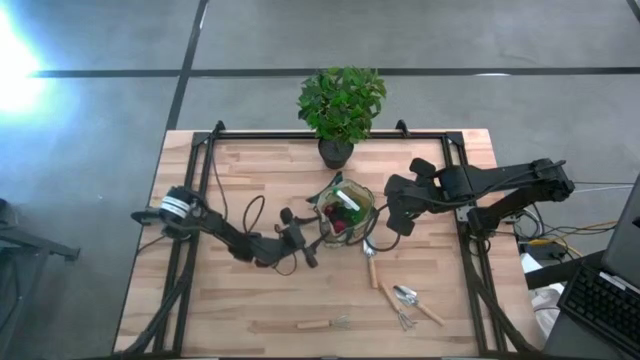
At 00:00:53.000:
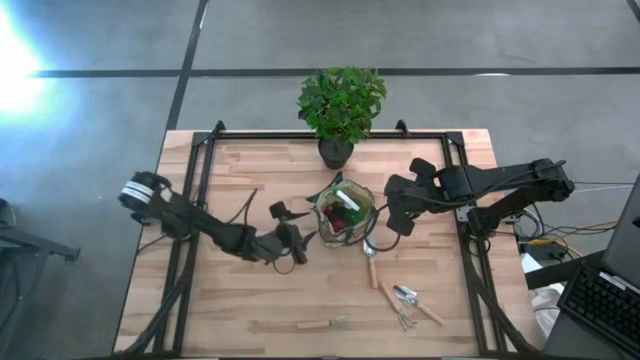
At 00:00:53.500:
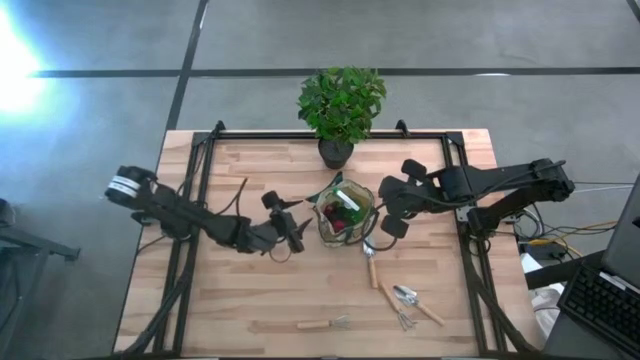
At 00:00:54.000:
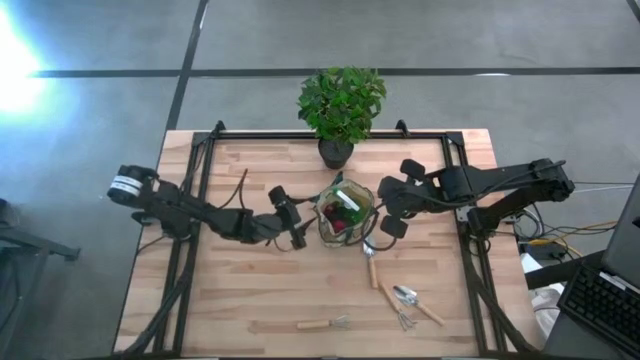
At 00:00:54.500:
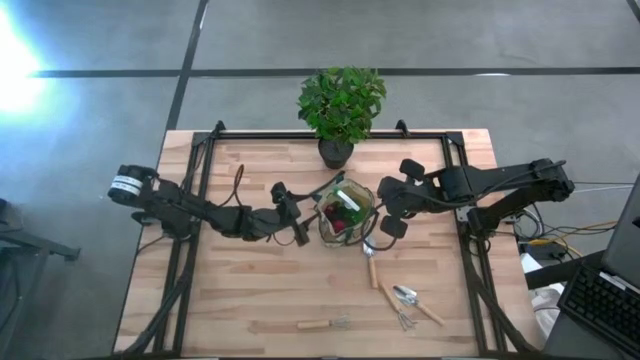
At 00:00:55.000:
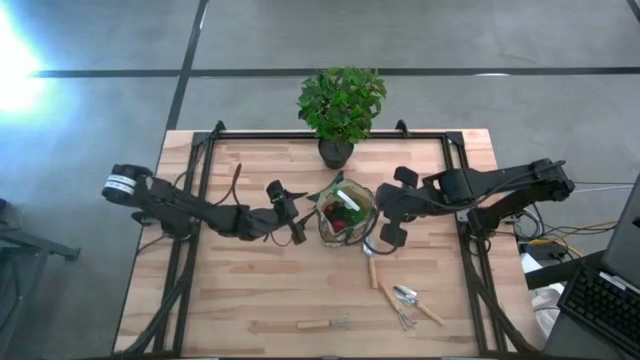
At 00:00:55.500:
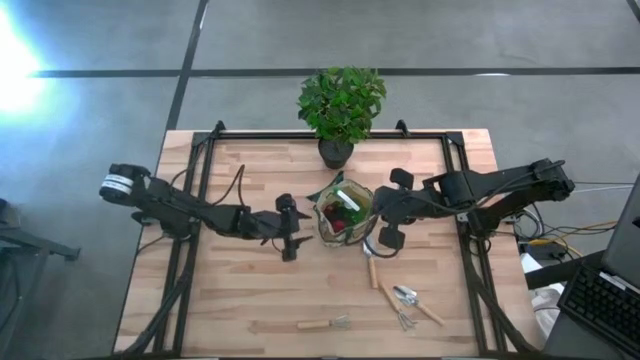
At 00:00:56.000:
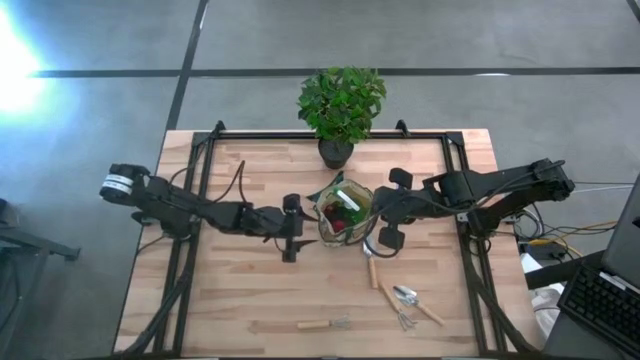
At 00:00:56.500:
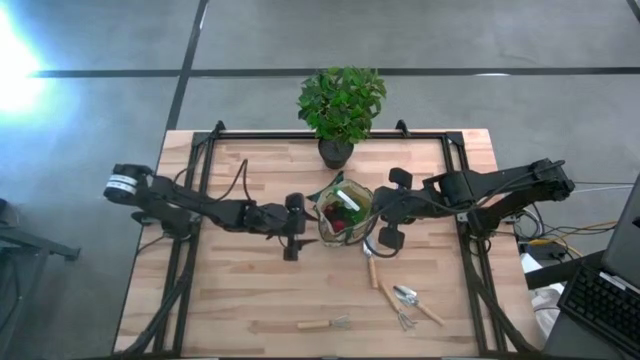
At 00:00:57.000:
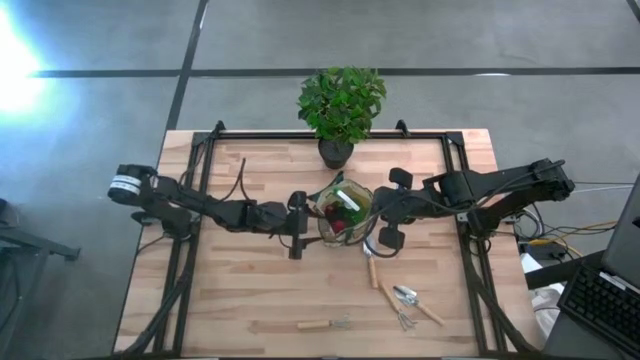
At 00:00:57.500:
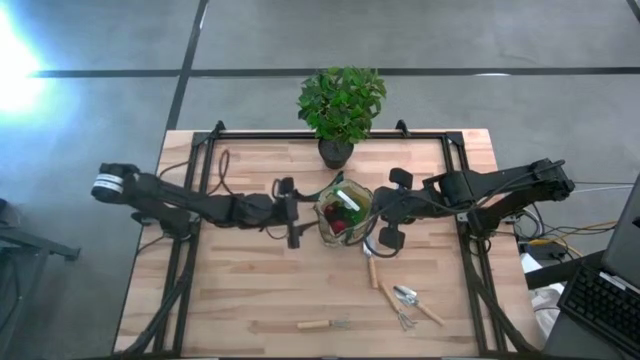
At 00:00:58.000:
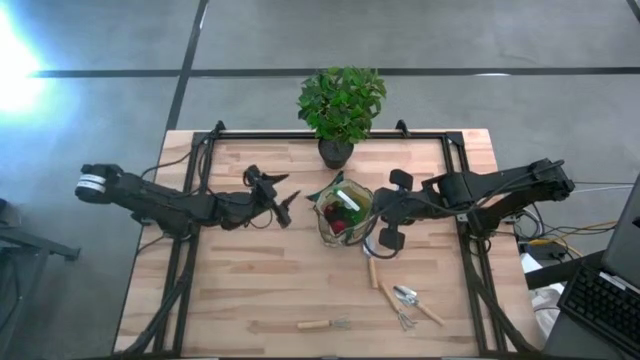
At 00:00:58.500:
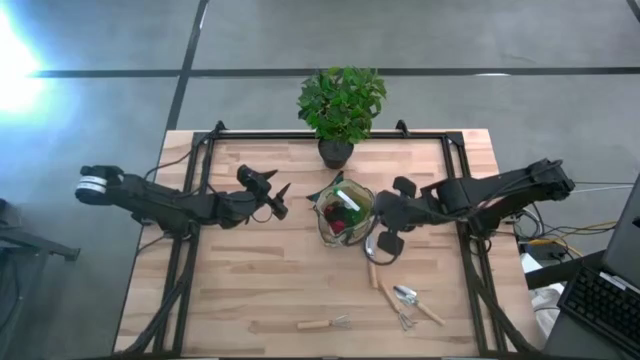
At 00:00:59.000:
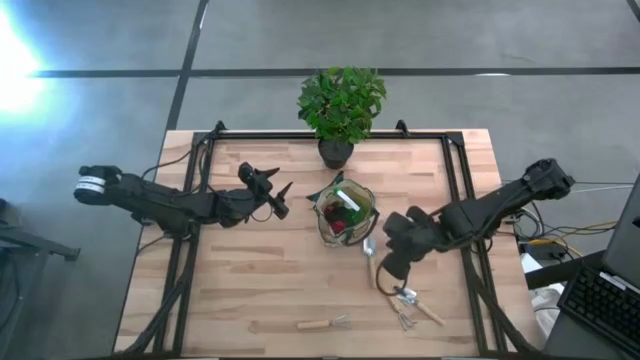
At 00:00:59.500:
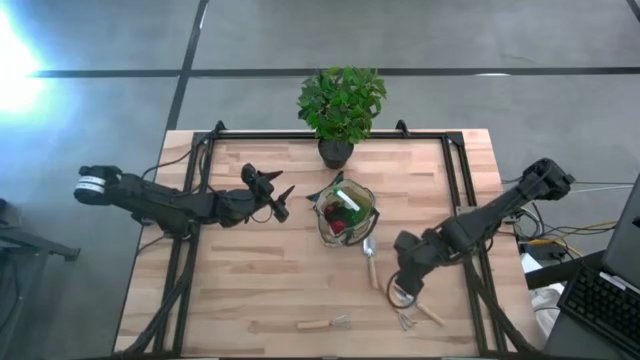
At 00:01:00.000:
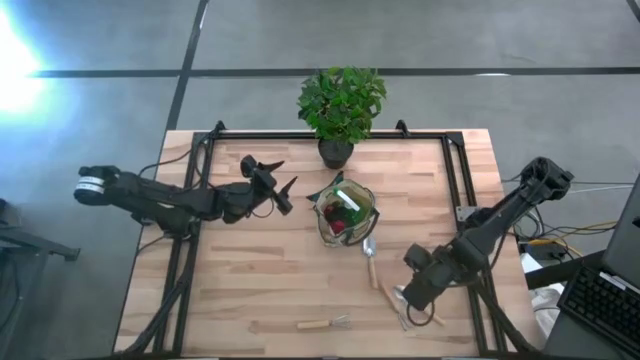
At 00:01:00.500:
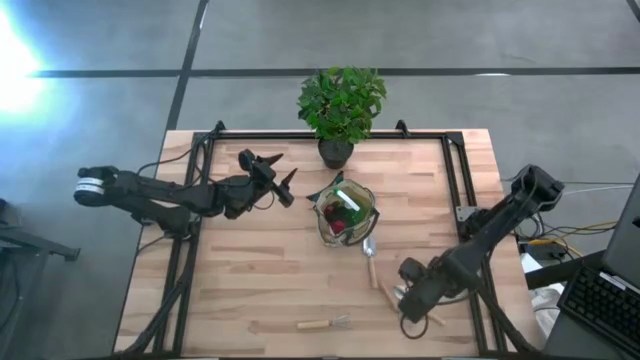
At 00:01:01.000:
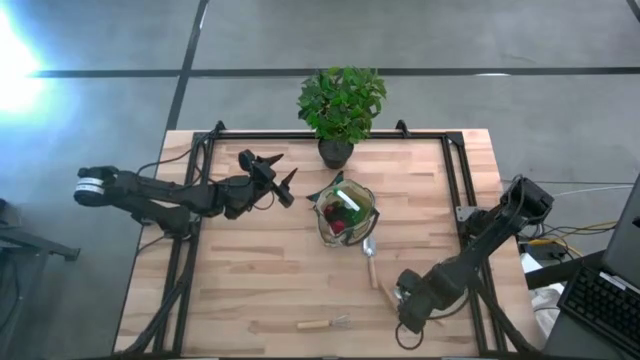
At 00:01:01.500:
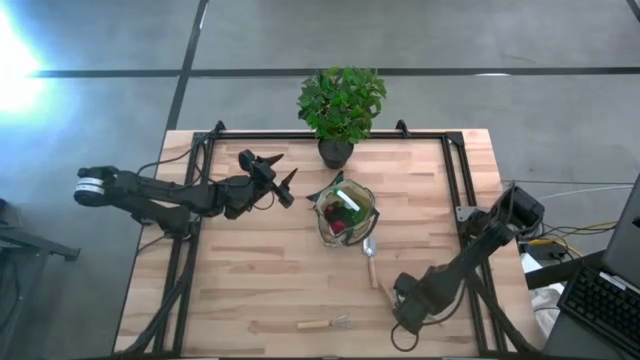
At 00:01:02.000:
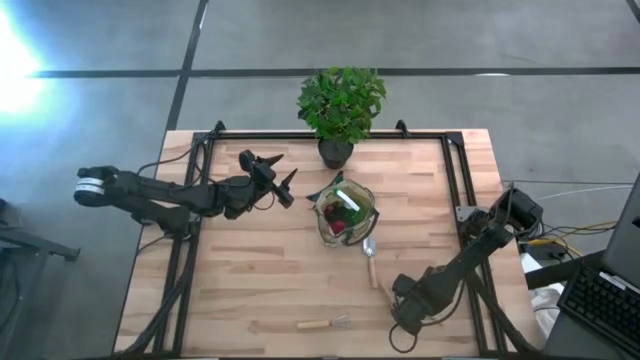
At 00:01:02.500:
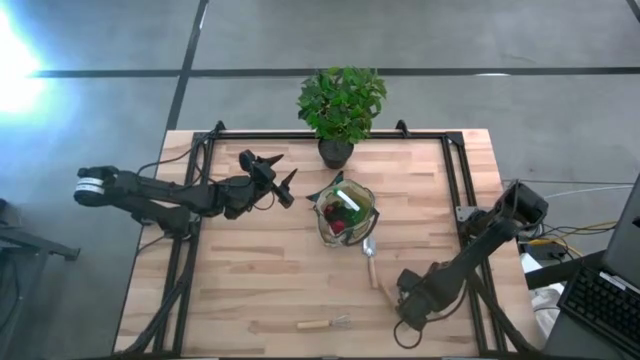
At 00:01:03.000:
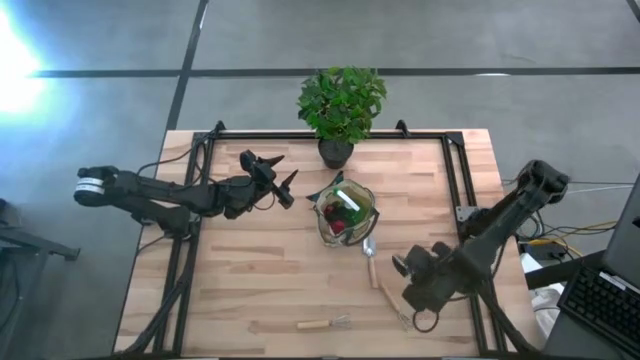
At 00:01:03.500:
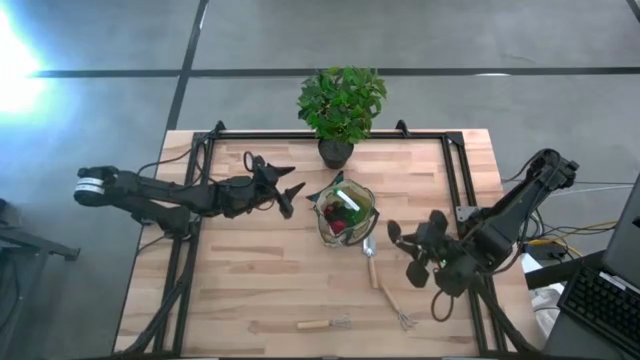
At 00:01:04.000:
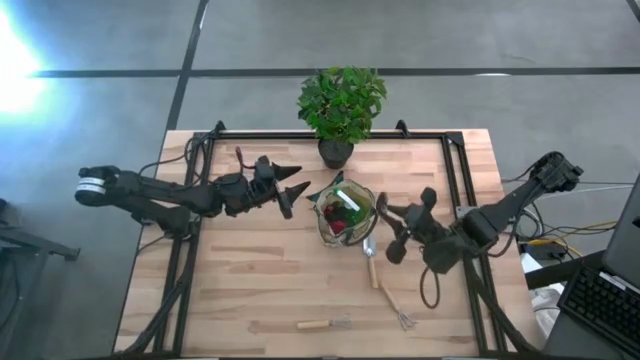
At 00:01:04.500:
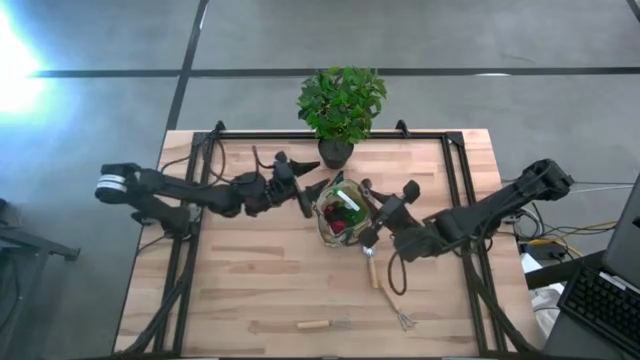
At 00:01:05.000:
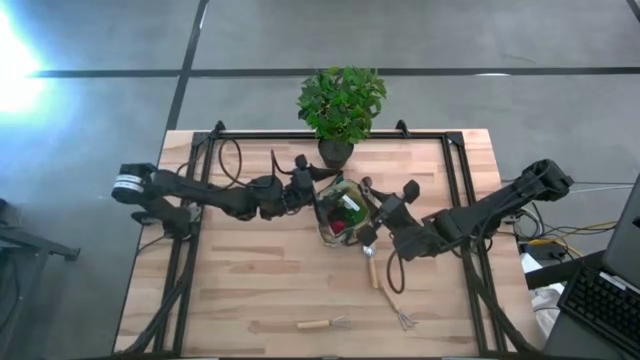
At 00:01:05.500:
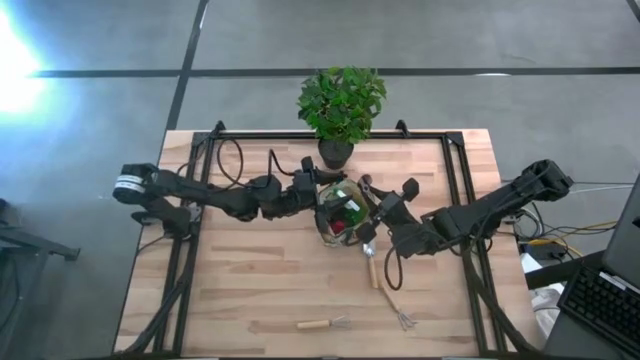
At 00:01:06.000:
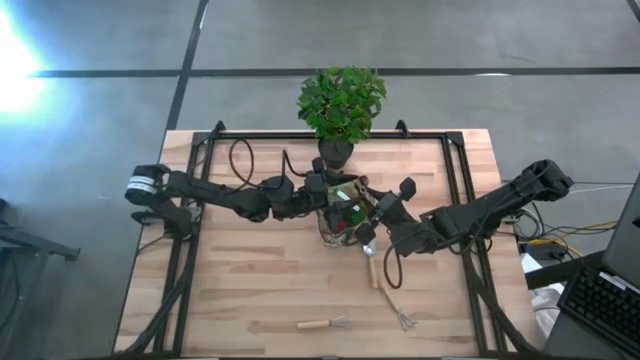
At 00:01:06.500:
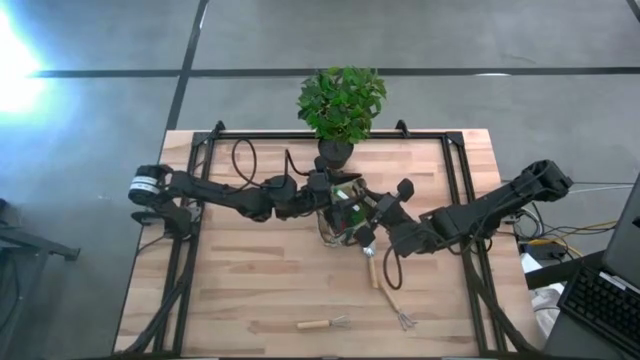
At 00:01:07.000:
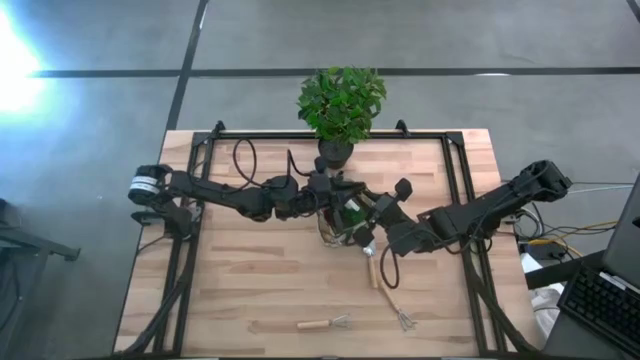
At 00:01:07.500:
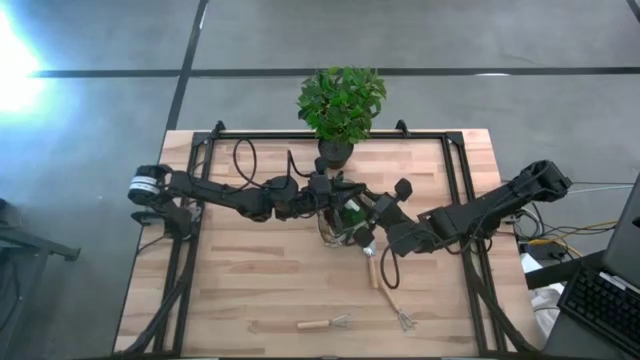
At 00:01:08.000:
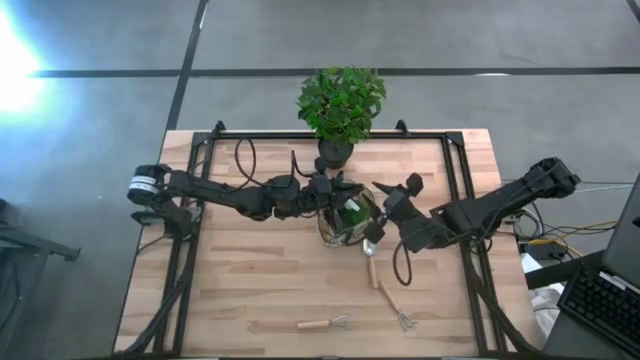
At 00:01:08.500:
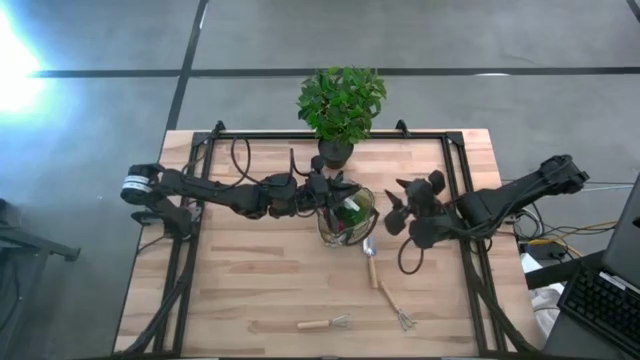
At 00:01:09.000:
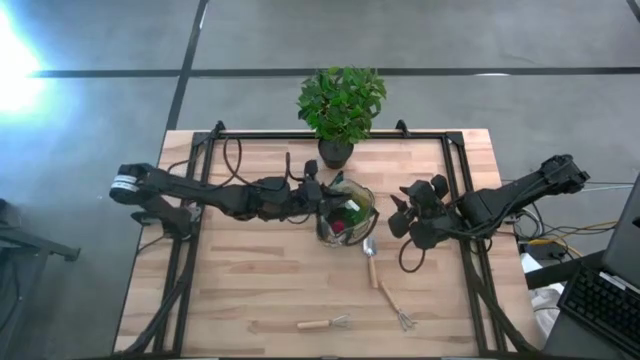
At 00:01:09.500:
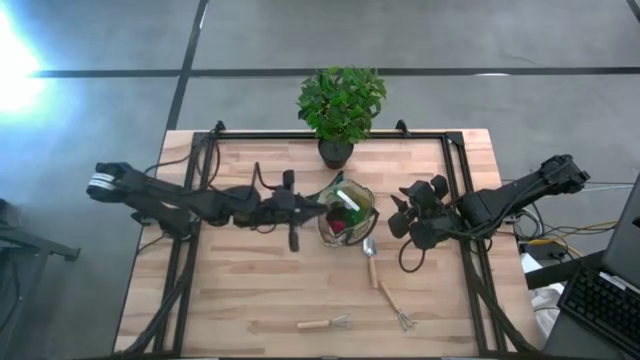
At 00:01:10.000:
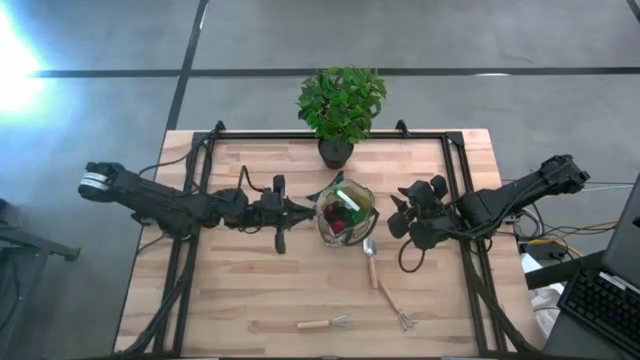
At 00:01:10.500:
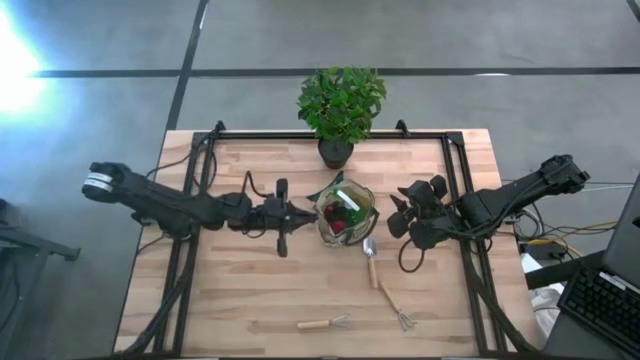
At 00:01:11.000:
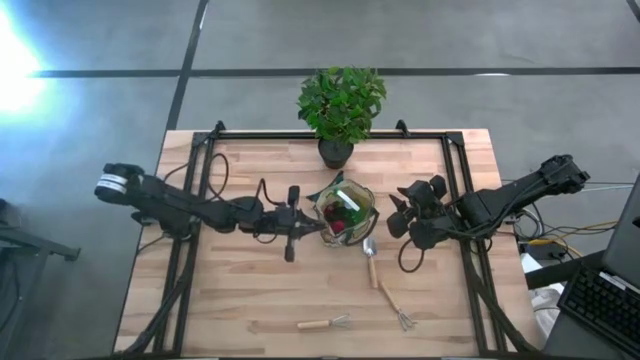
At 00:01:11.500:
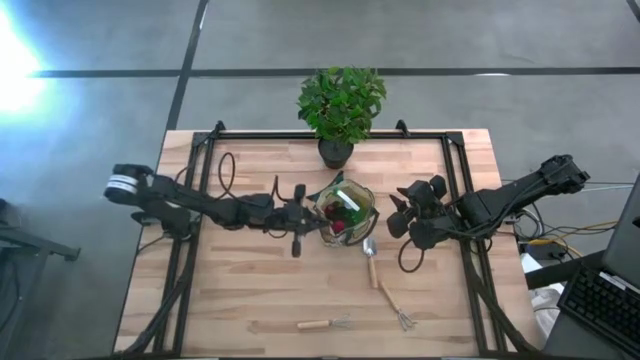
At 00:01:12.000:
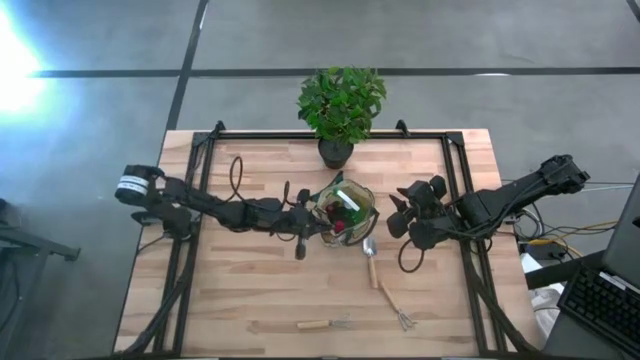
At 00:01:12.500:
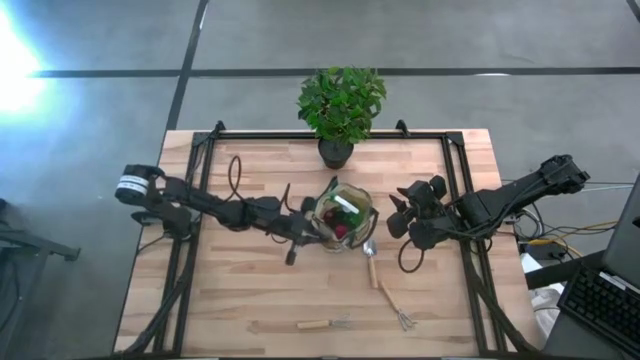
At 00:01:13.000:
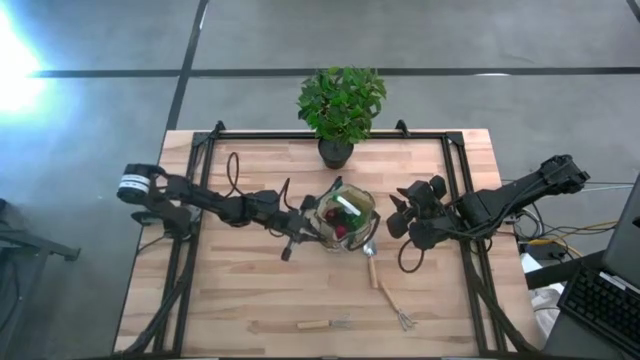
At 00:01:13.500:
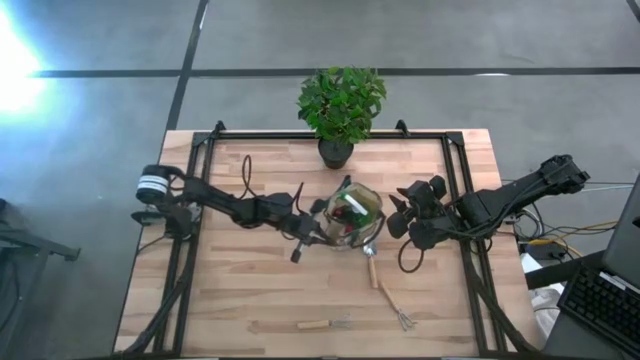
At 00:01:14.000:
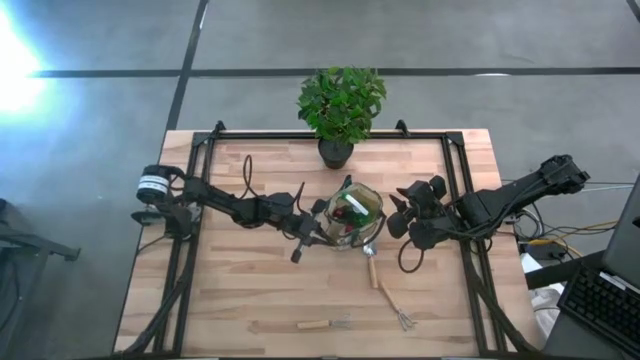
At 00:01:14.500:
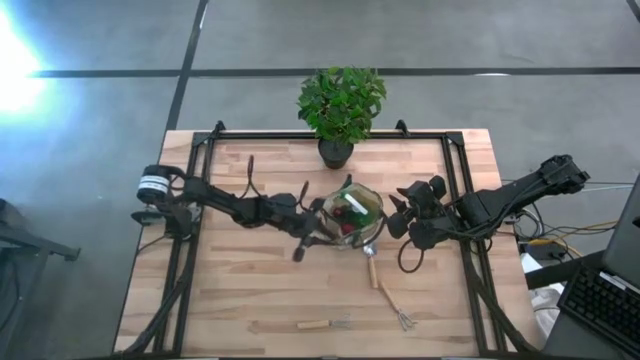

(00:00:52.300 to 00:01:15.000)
Task: Pick & Place Garden tools in Gardening bag
Put the bottom brown trowel into the side pocket of the gardening bag
